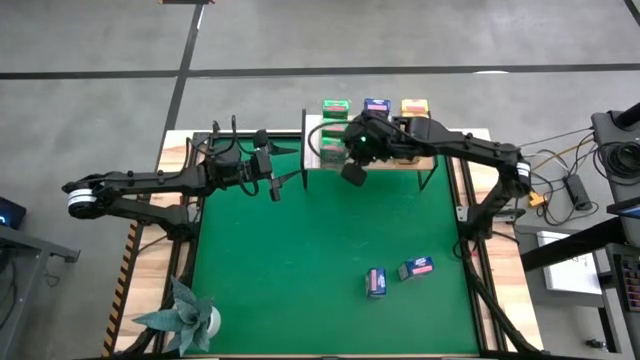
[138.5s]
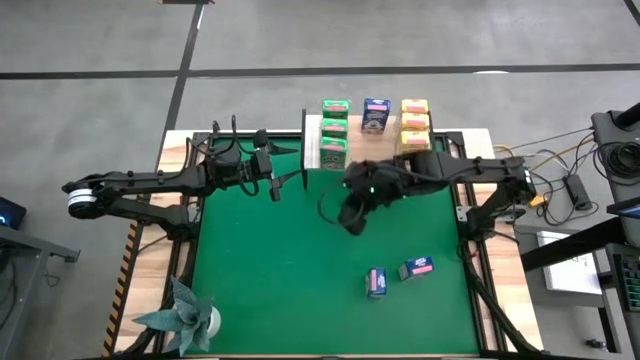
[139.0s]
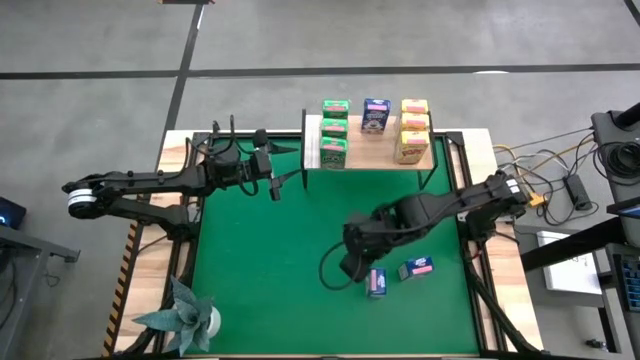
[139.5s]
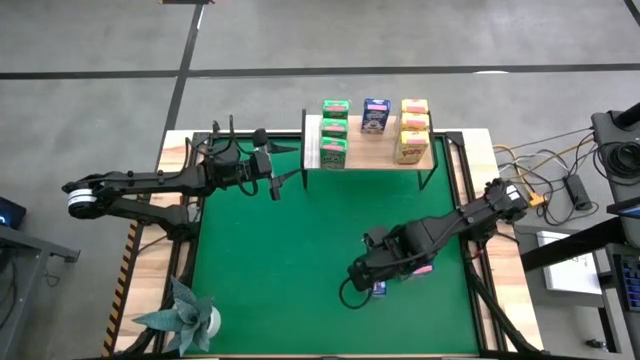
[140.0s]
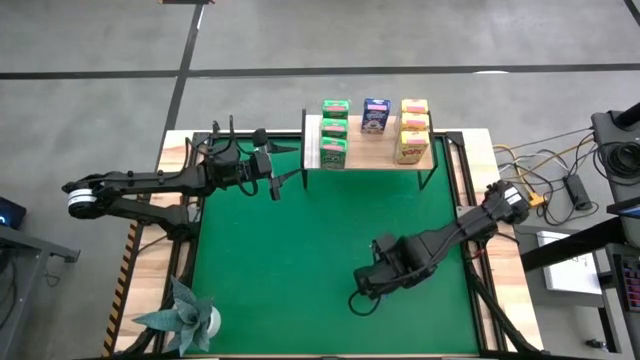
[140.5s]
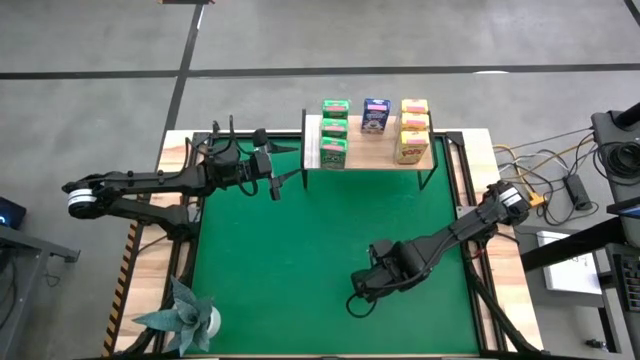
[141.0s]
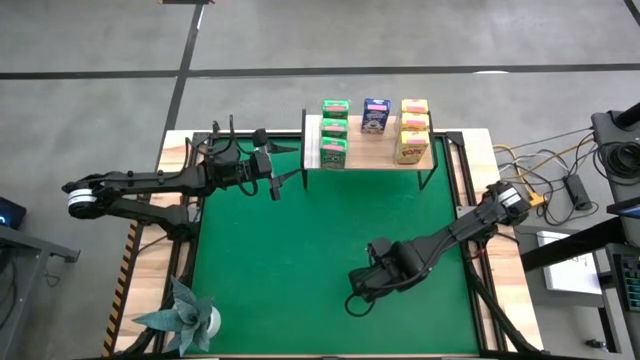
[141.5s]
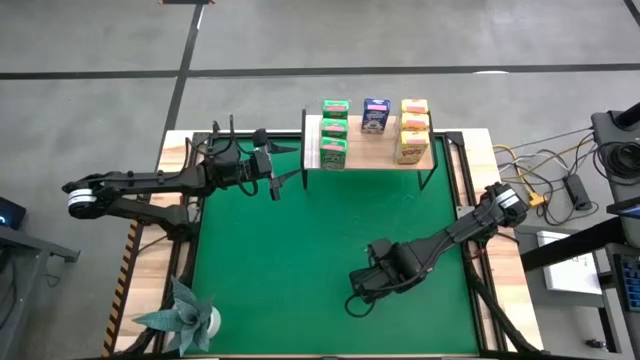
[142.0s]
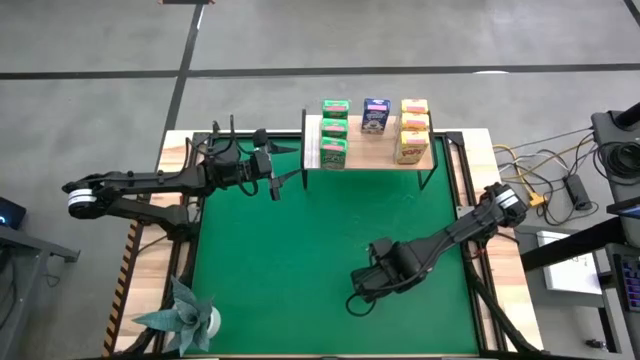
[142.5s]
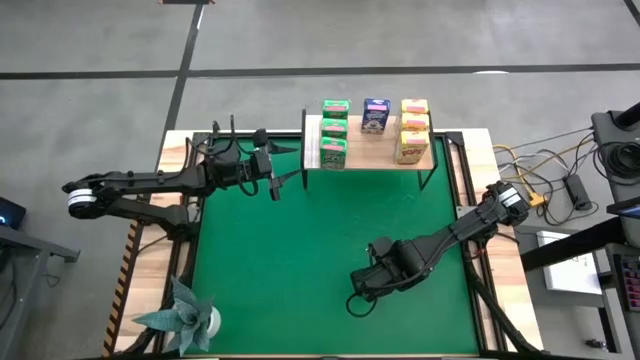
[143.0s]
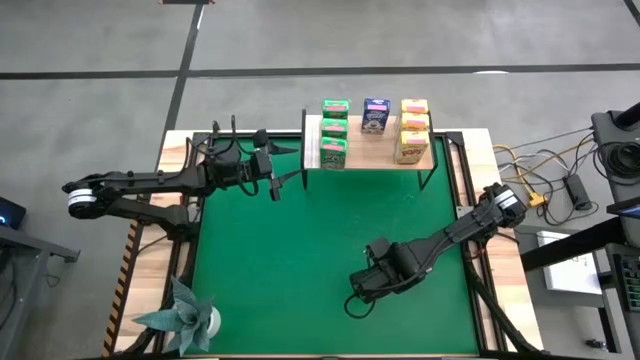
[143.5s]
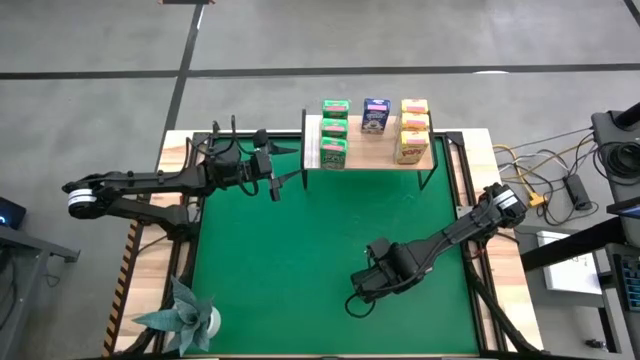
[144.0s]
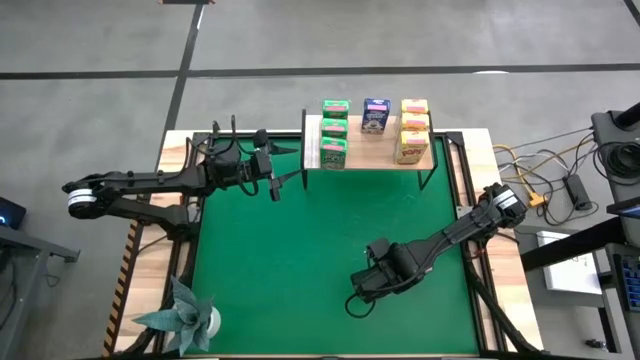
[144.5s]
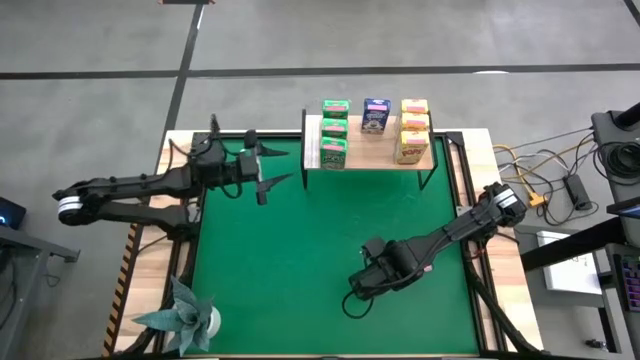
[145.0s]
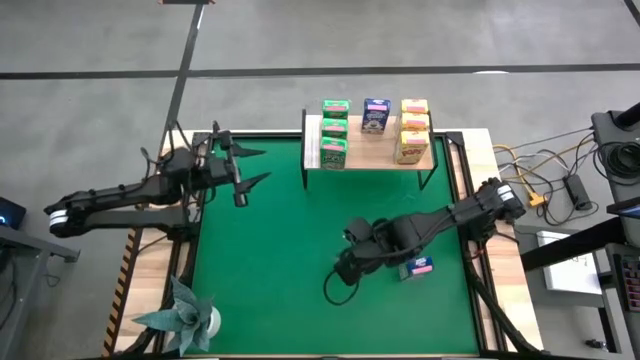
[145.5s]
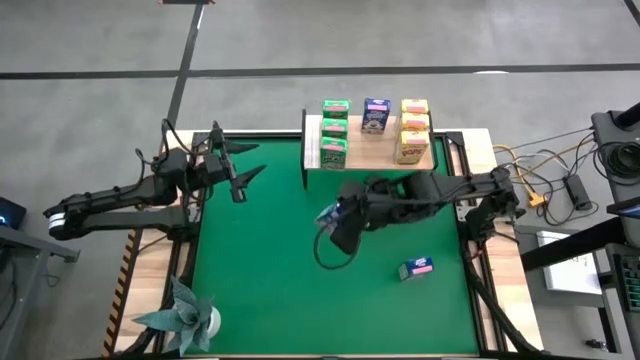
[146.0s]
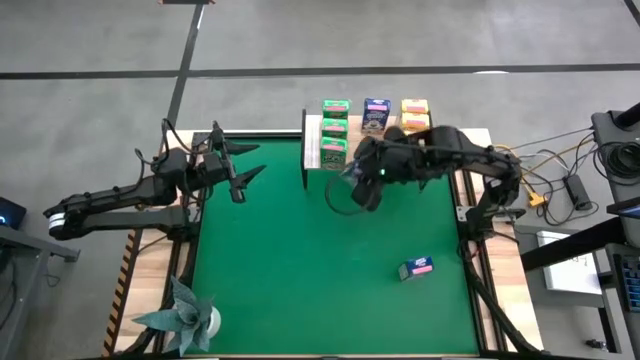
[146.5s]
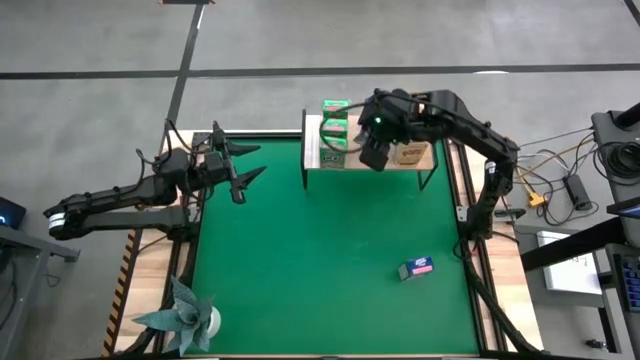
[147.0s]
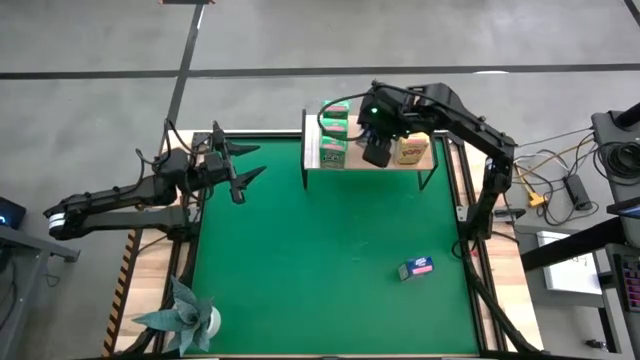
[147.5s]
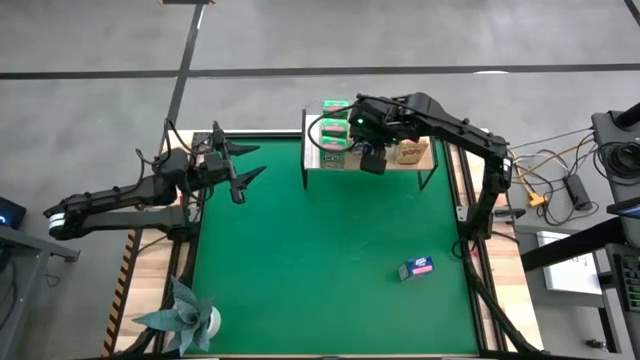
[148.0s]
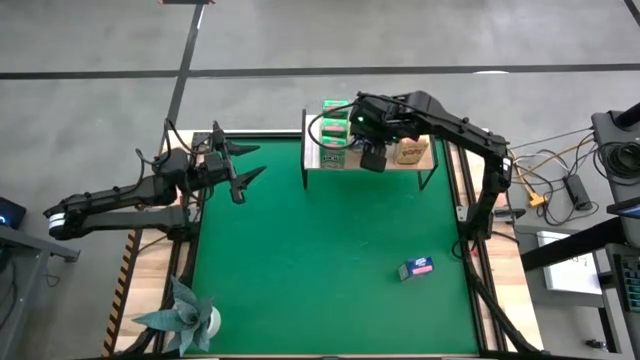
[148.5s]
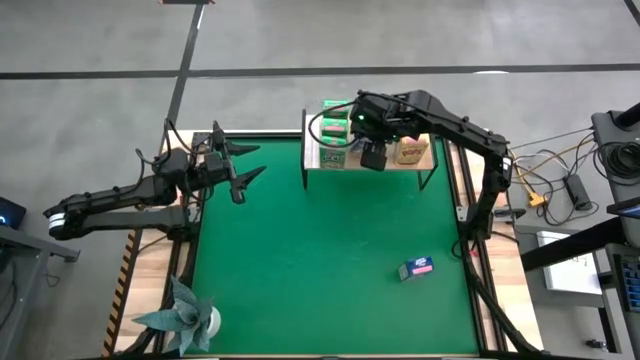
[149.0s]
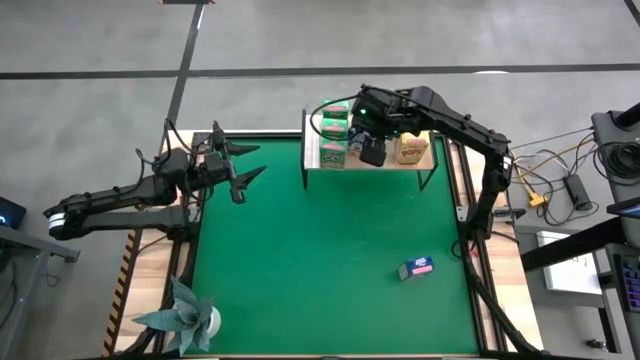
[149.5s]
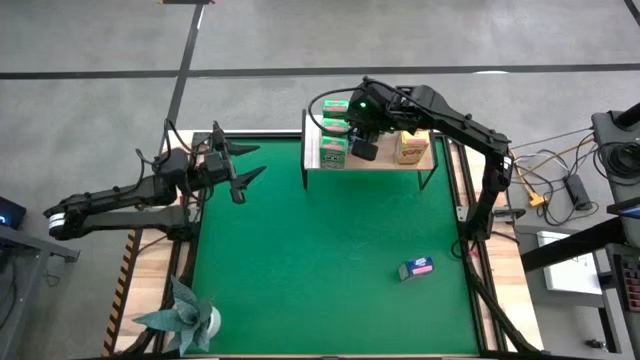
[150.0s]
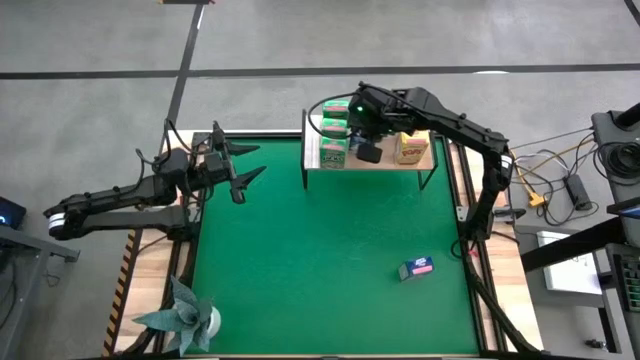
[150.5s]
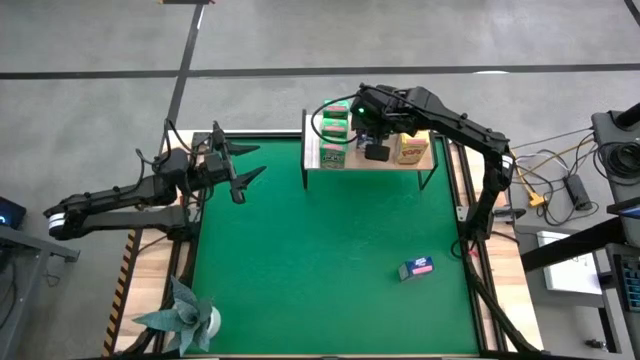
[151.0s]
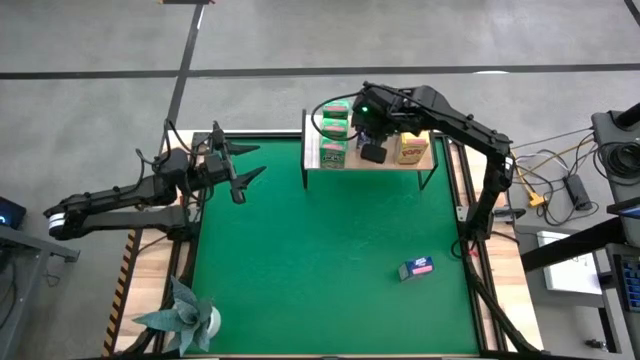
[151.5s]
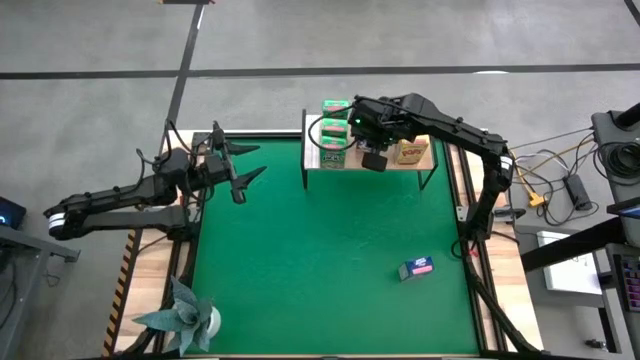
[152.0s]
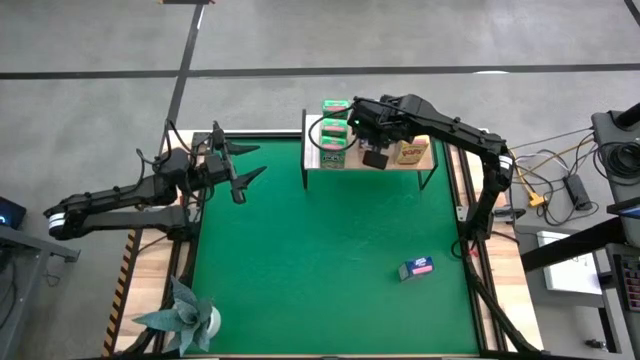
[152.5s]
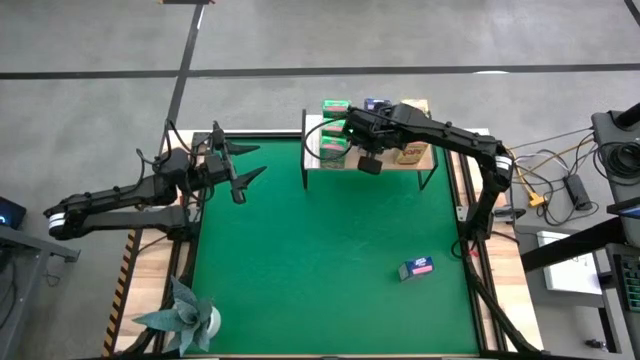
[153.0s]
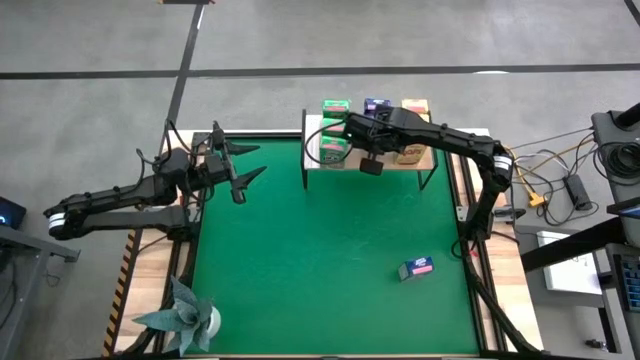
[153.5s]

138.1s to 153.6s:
Task: Stack cereal on shelf
Put the left blue cereal box on the shelf aligned with the other blue cereal box

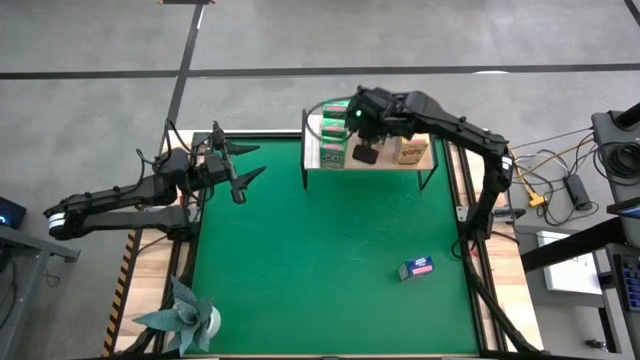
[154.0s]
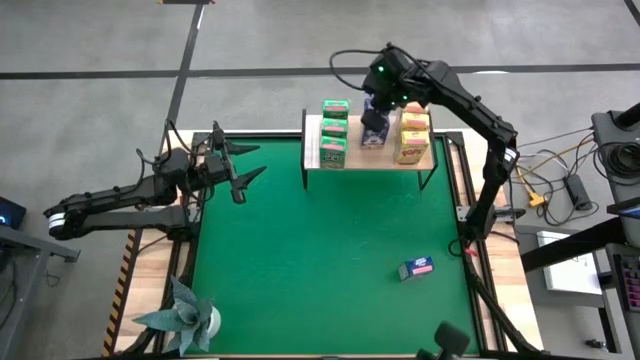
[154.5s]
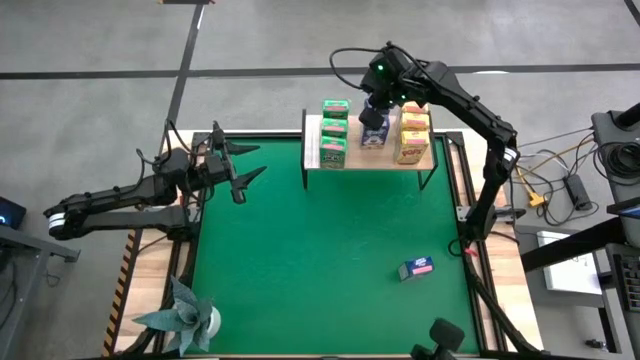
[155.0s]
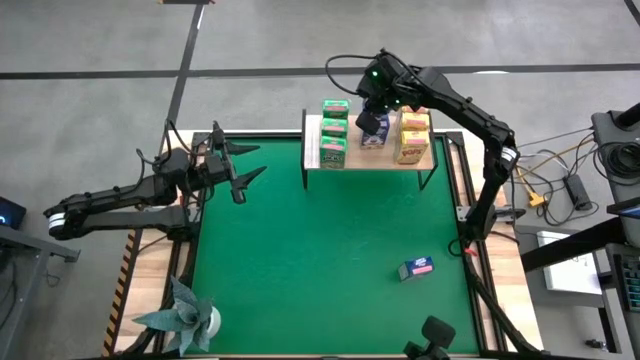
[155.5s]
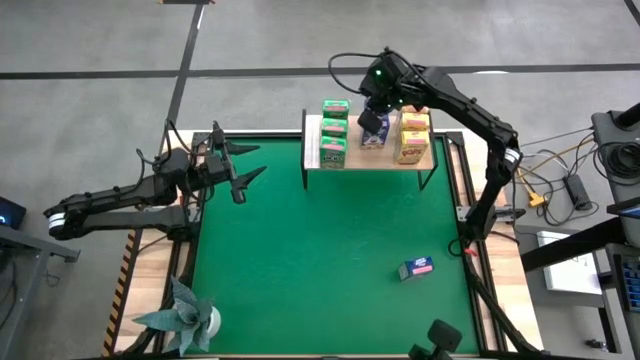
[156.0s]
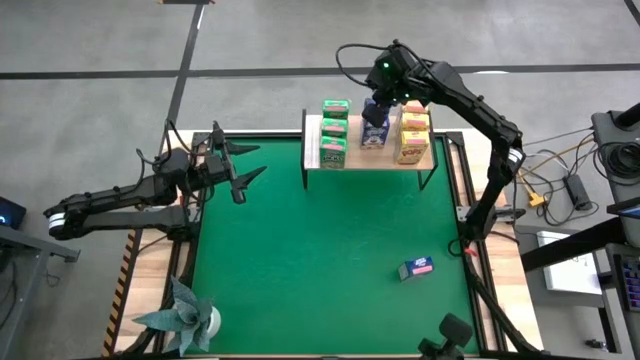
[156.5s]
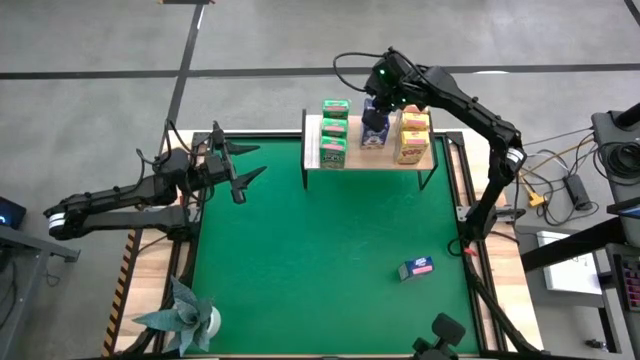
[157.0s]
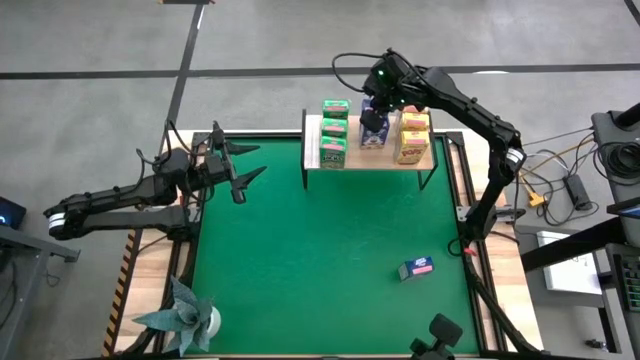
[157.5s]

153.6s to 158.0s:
Adjust the blue cereal box

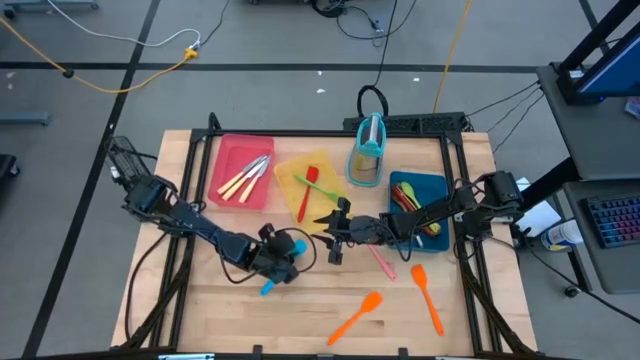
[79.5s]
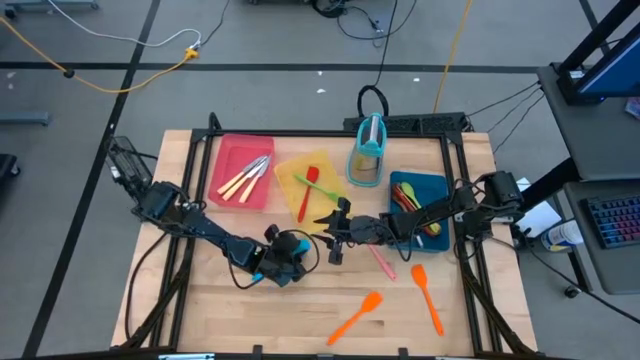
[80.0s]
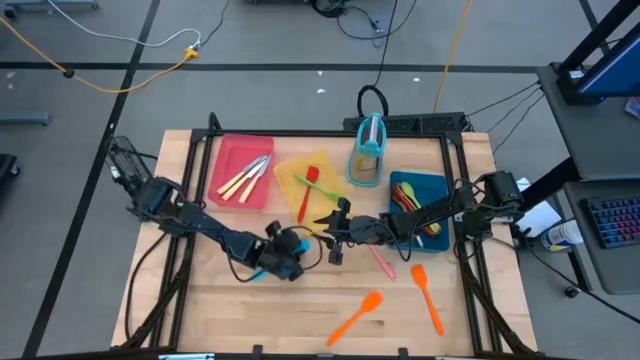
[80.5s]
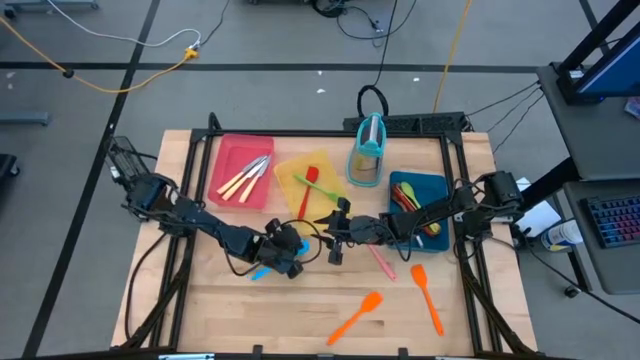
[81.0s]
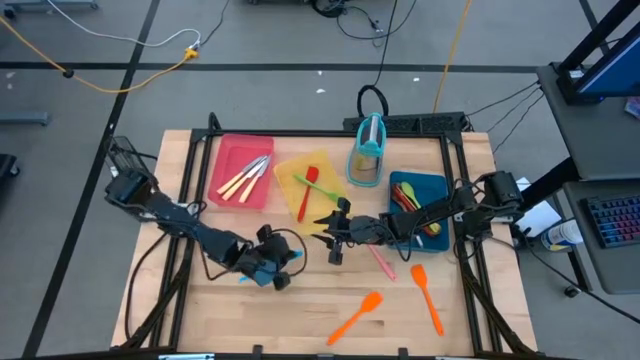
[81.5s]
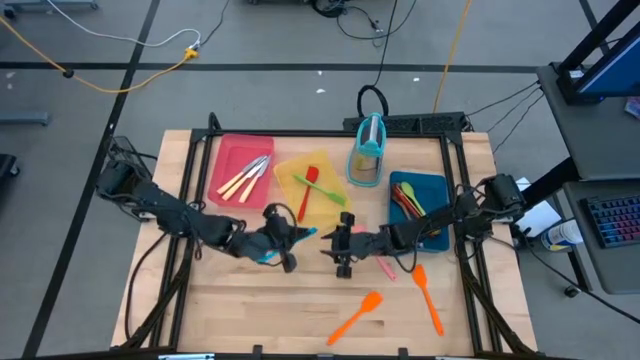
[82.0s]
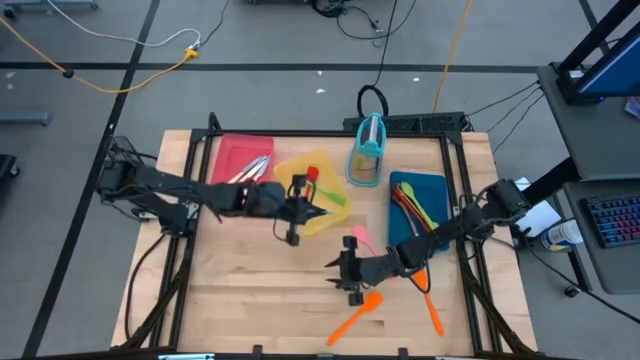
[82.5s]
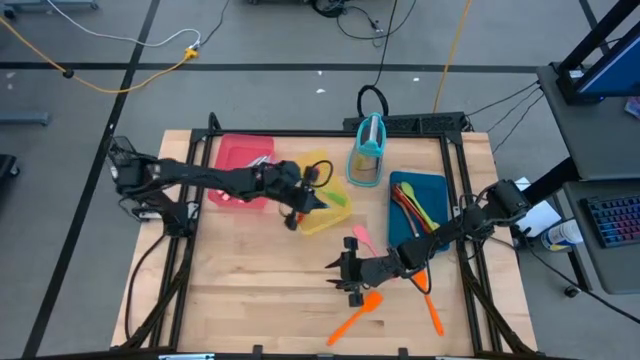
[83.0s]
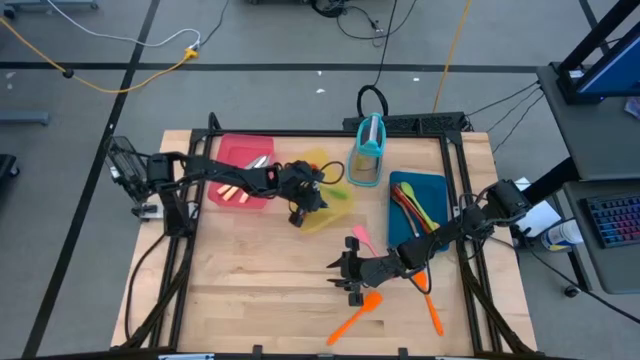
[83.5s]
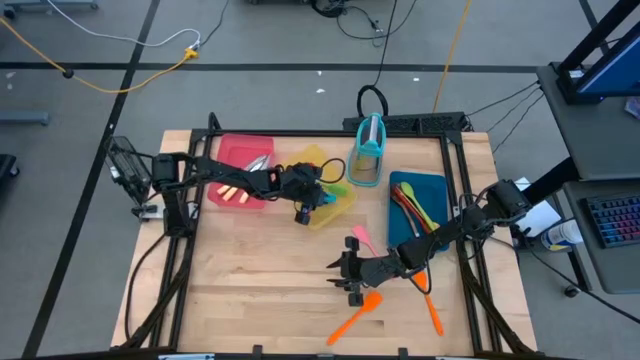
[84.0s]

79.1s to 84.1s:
Task: Pick & Place Kitchen Items
Put the blue spatula into the yellow bin
